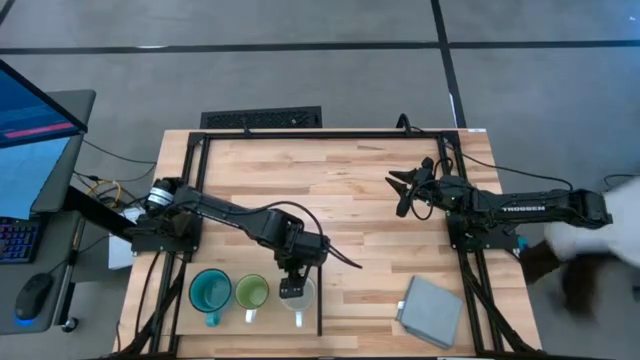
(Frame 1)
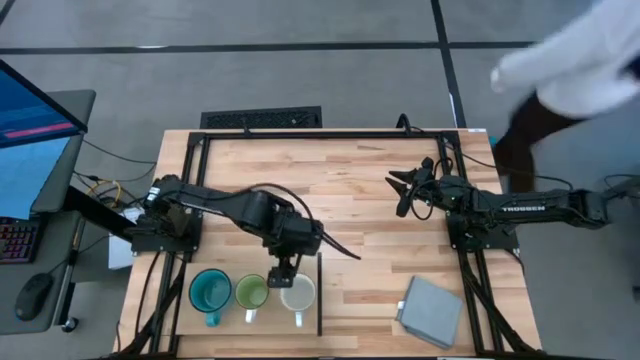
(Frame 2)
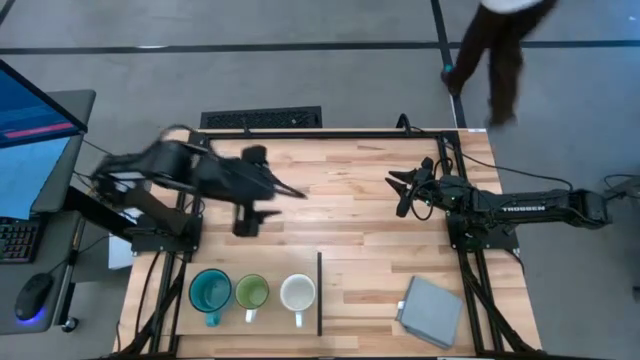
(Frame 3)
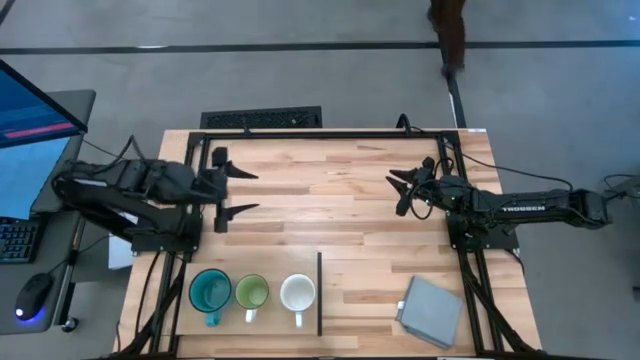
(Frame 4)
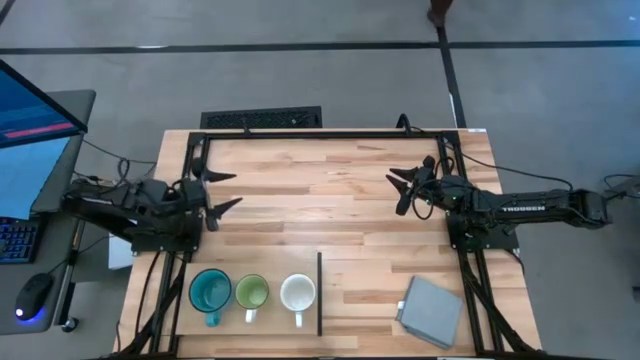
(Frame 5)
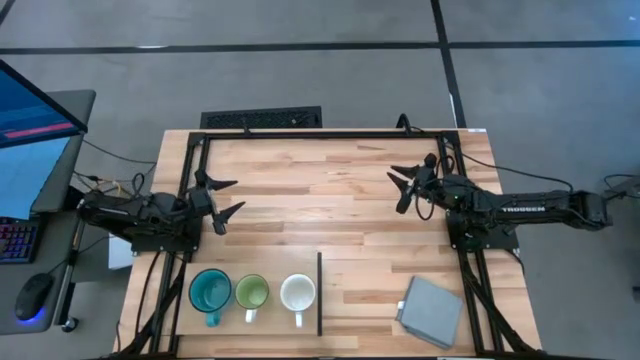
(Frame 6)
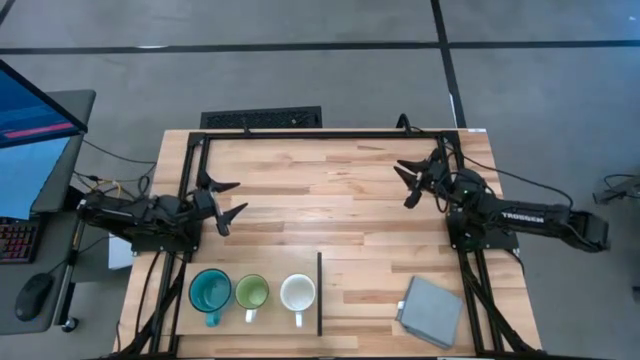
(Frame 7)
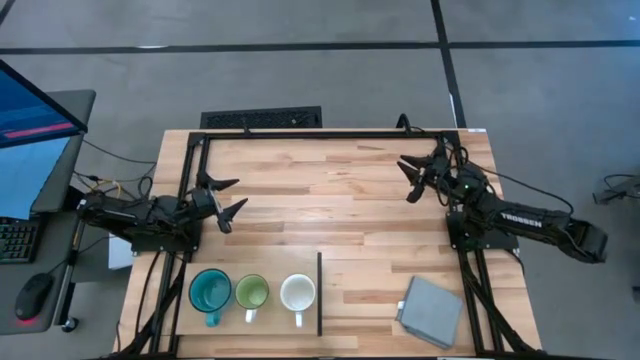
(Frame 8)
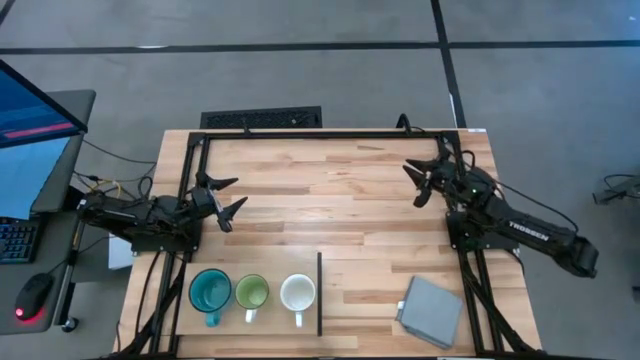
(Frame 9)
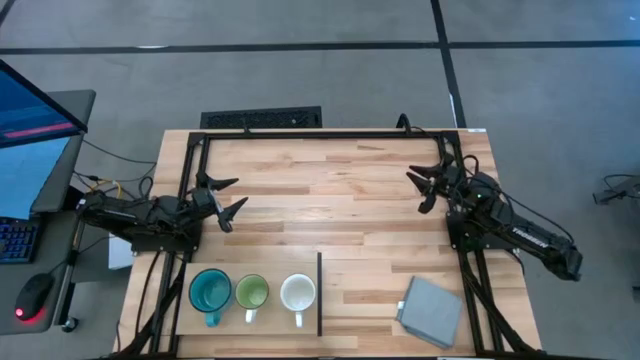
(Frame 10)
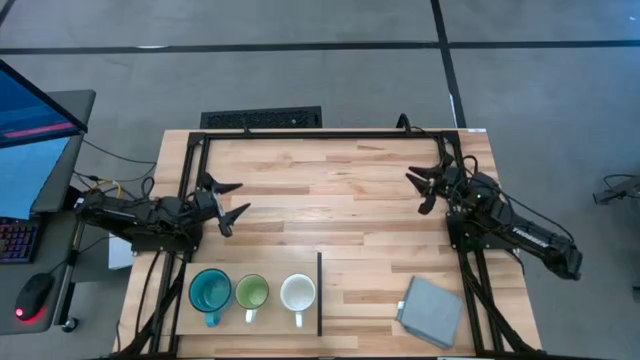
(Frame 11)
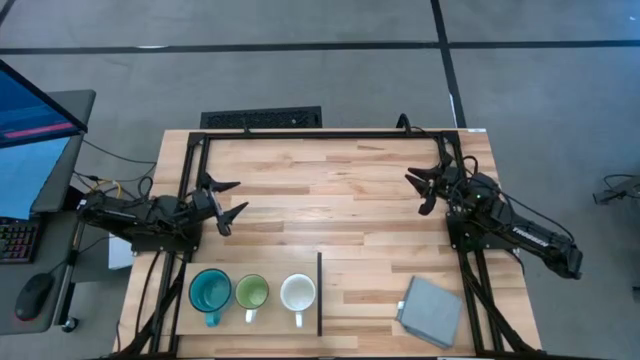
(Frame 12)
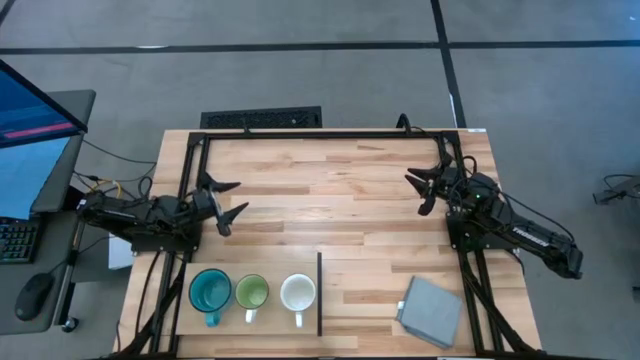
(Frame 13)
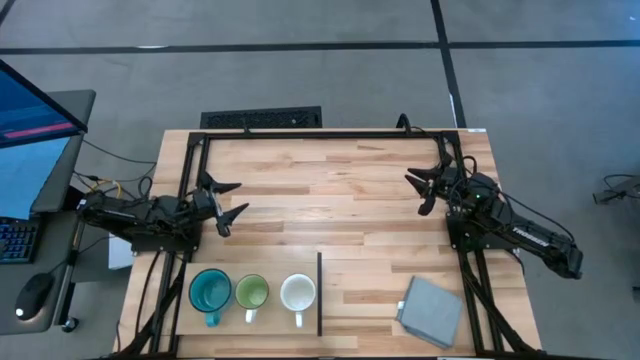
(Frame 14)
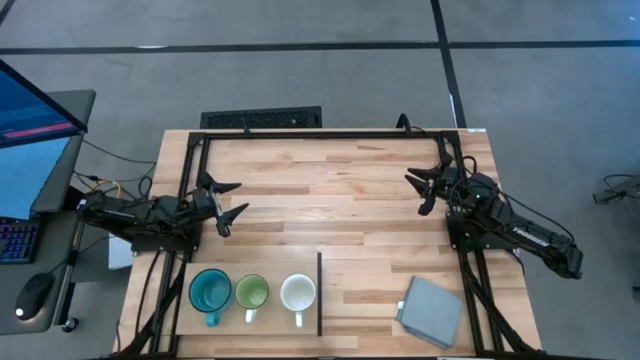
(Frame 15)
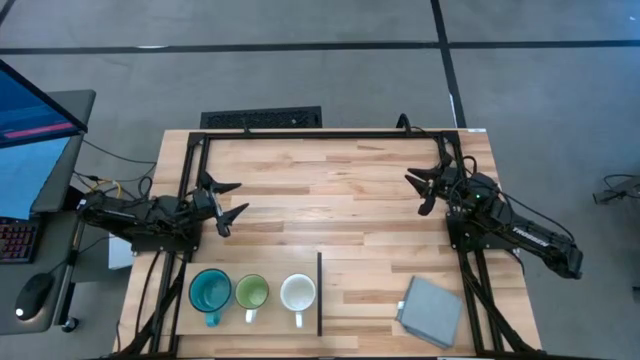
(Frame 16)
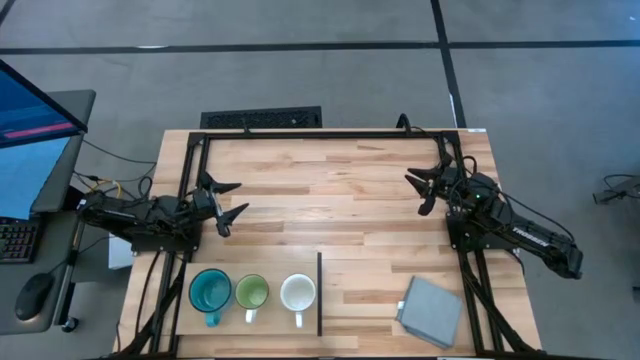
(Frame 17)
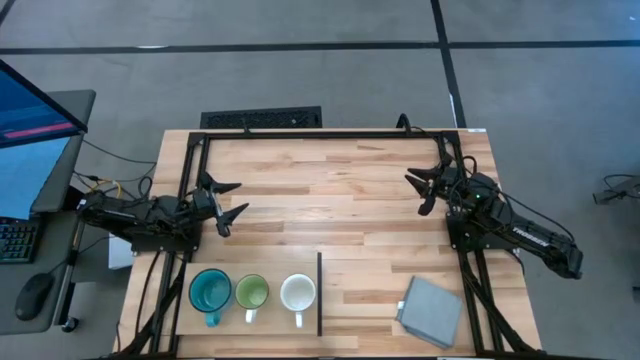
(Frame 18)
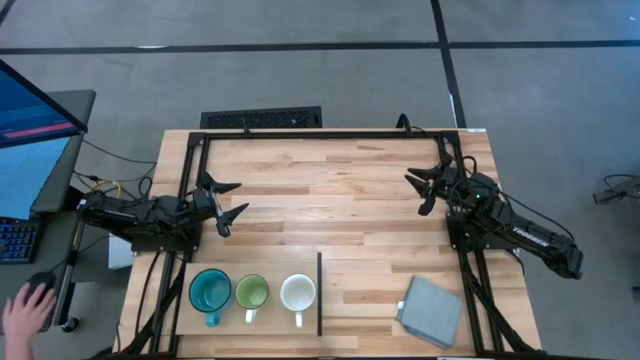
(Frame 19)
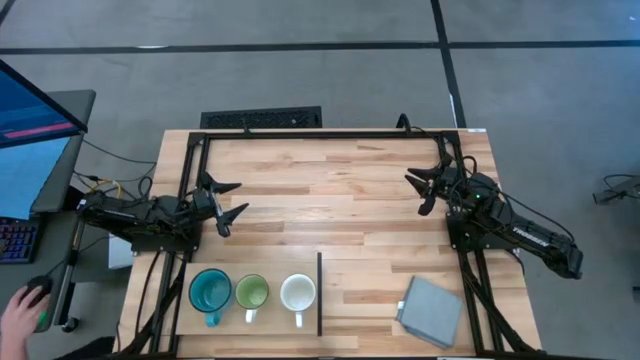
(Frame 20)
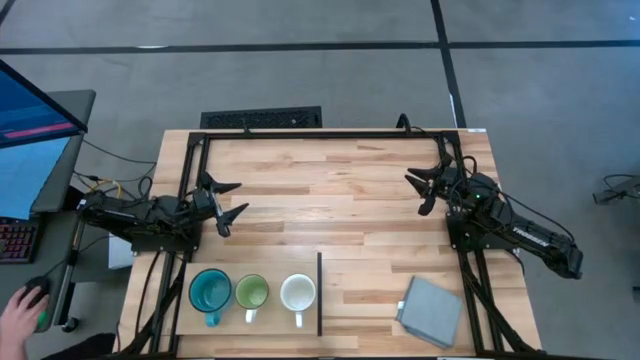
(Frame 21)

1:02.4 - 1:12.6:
Task: Stack small to large cups/mugs on shelf
Return to Home Position

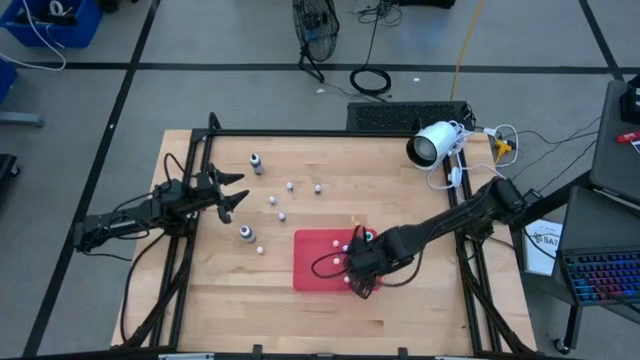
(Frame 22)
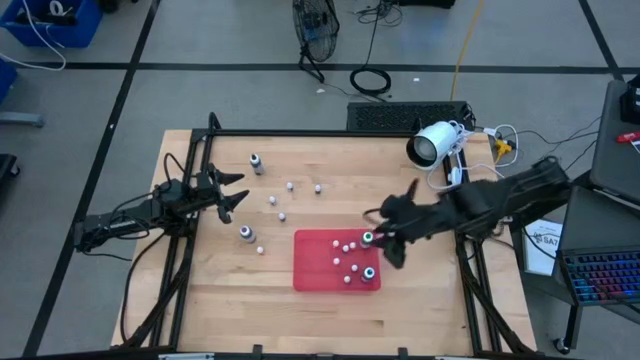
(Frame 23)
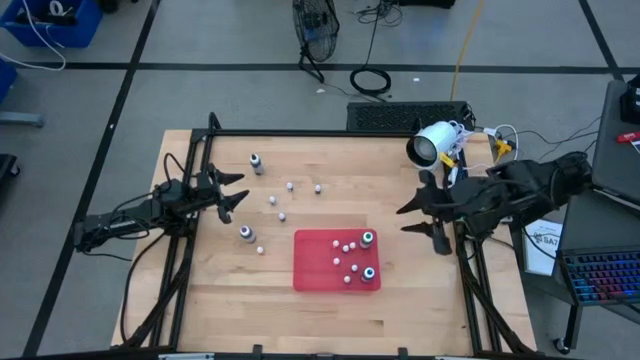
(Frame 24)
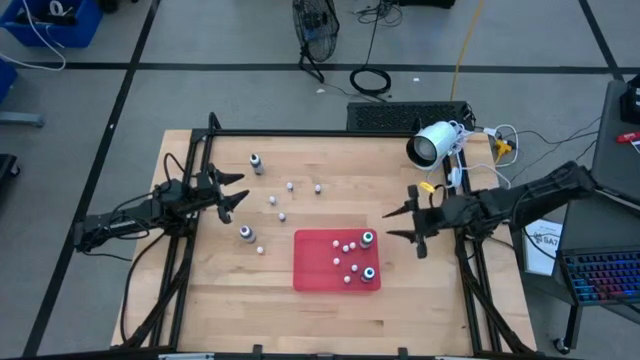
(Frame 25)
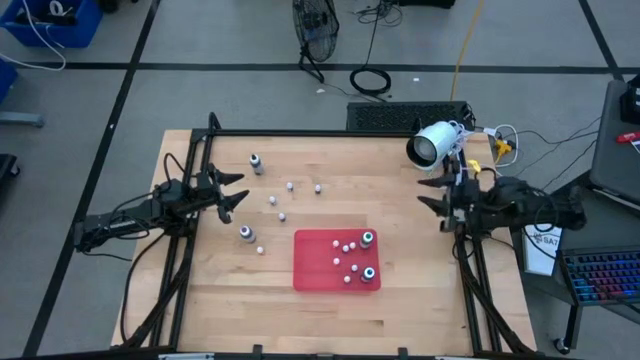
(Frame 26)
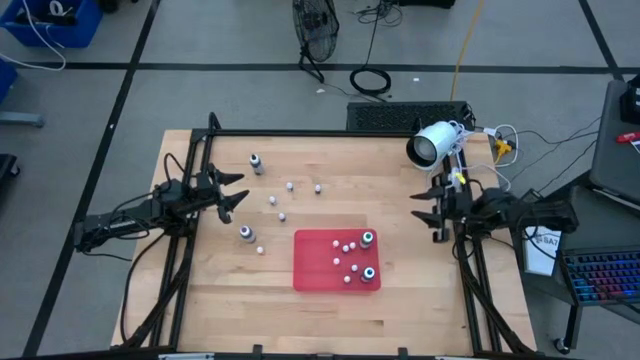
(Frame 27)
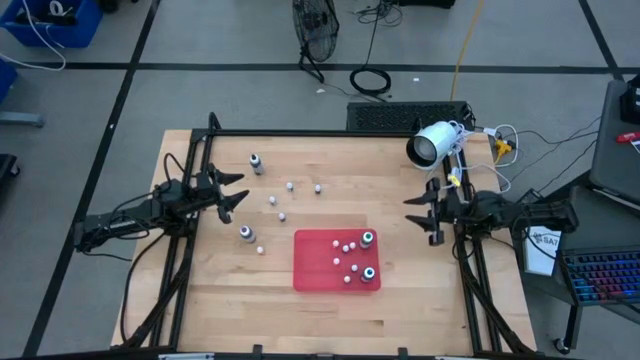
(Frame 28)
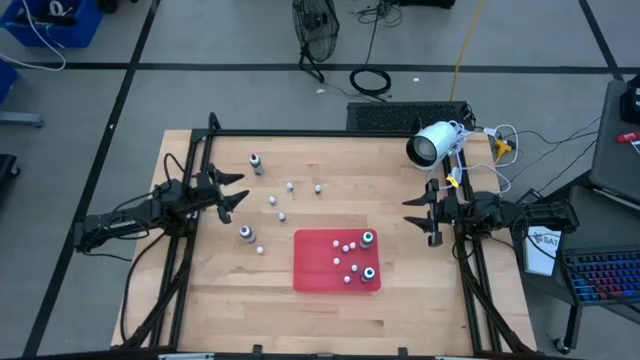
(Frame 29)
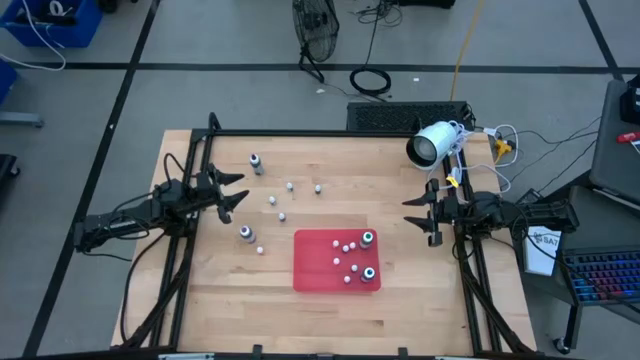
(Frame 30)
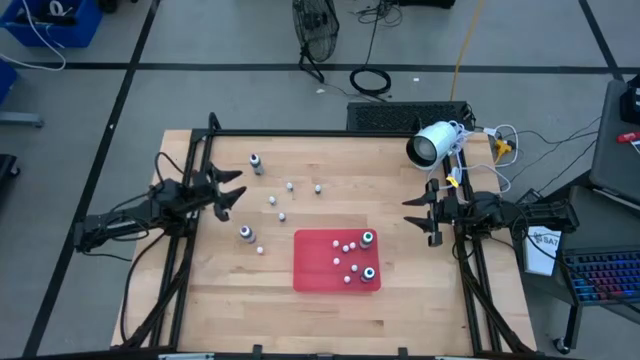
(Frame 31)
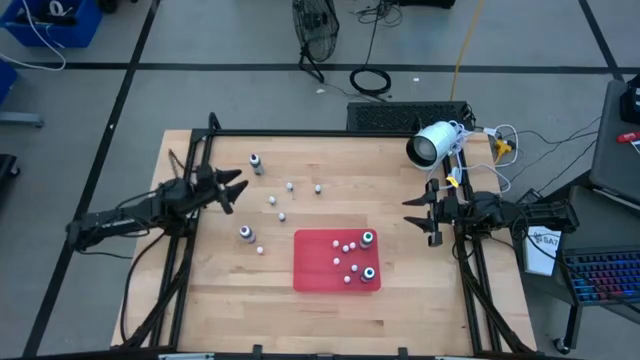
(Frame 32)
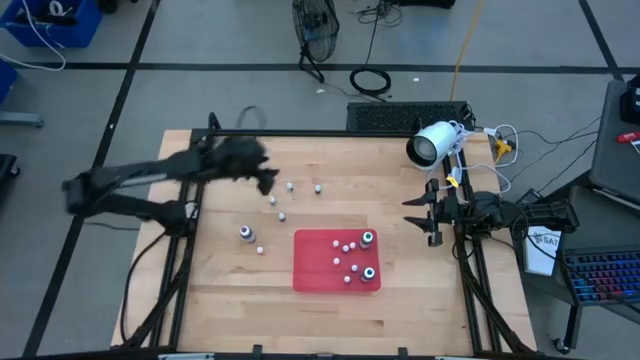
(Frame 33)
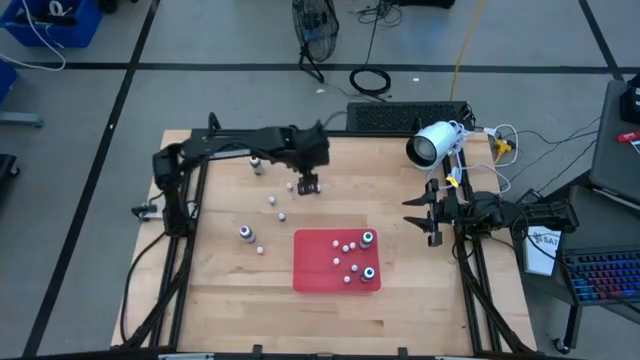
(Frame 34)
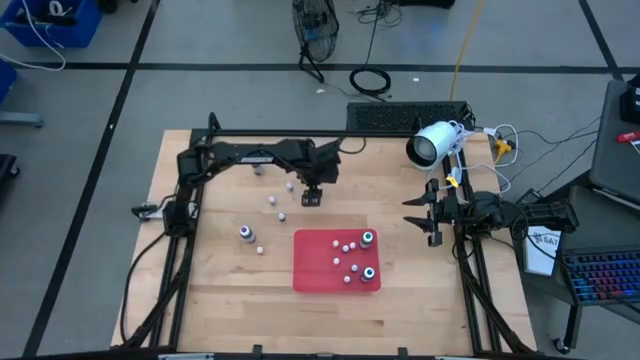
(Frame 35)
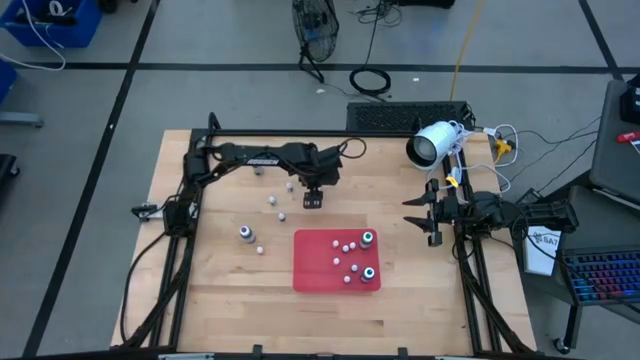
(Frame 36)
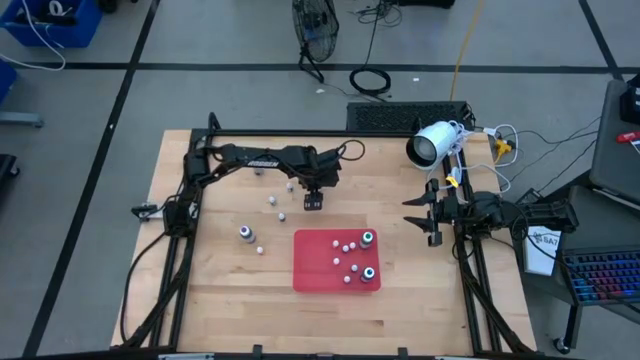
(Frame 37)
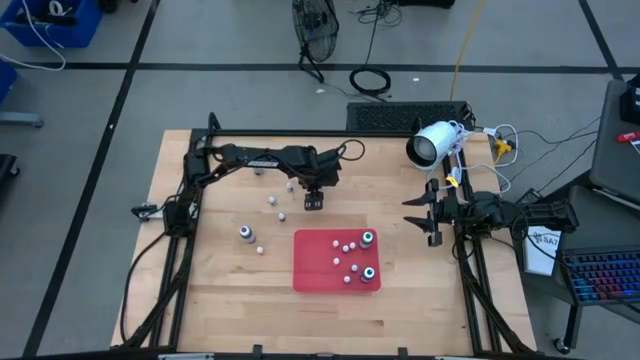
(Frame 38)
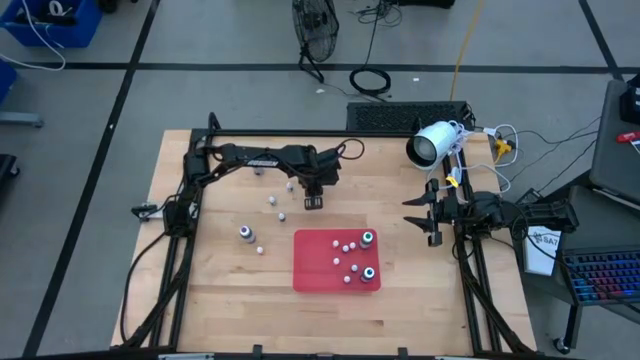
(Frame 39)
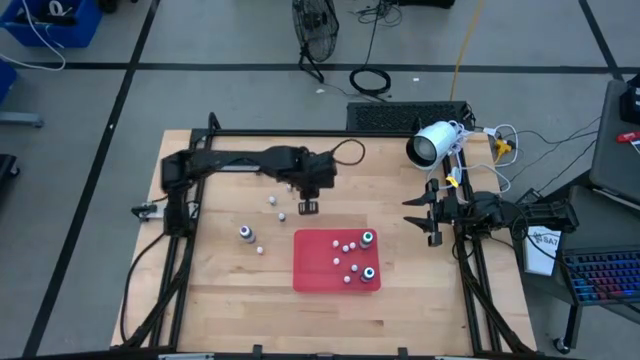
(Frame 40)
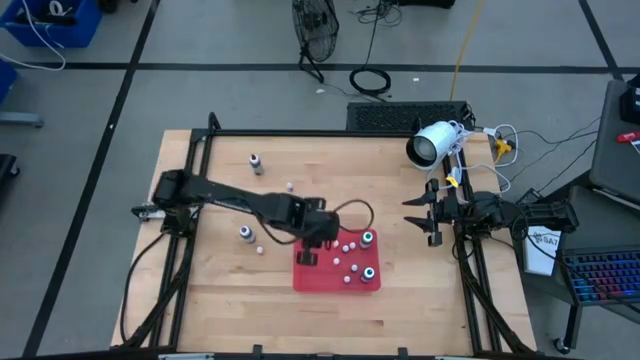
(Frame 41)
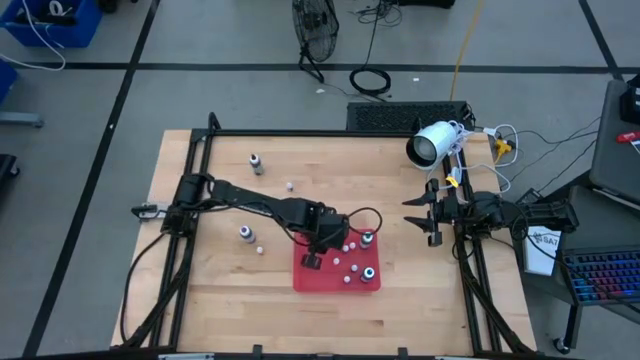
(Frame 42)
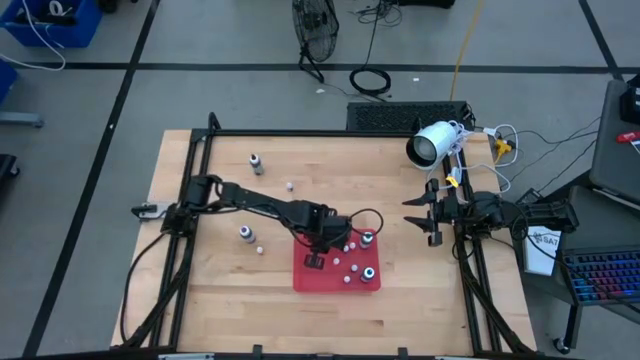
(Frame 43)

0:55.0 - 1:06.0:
Task: Pick & Place food coloring
Put the small black food coloring bottle into the red bin
